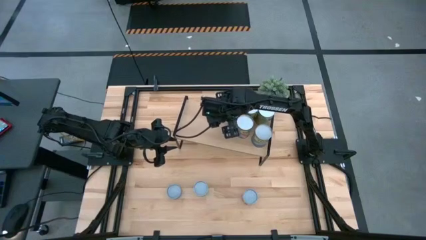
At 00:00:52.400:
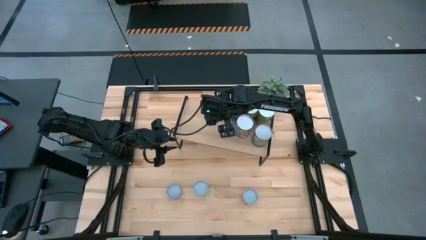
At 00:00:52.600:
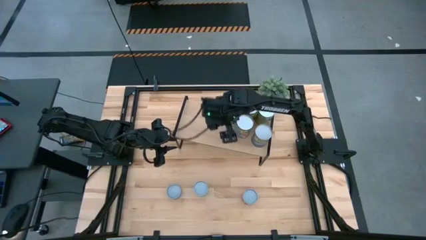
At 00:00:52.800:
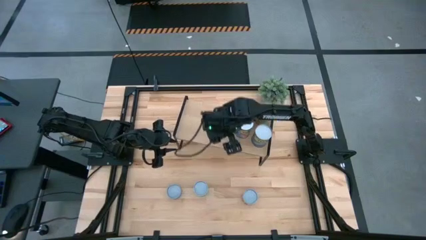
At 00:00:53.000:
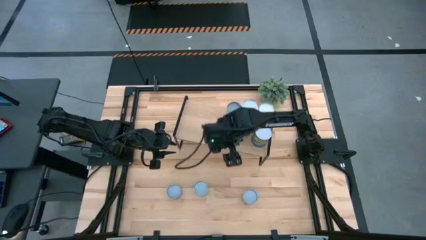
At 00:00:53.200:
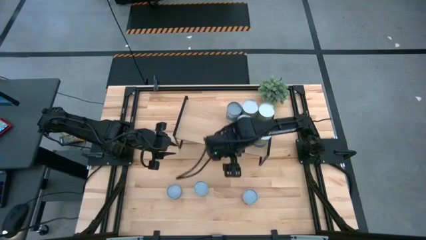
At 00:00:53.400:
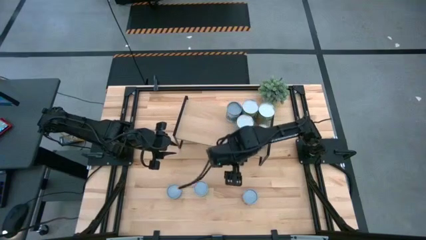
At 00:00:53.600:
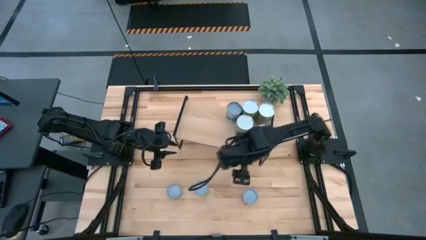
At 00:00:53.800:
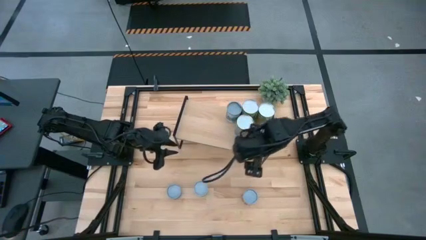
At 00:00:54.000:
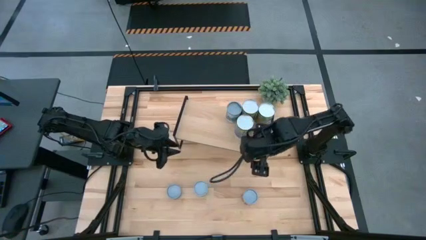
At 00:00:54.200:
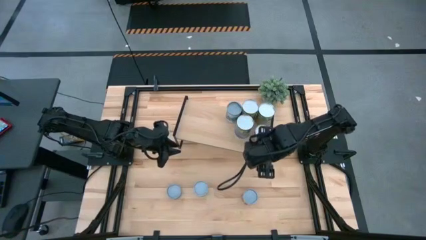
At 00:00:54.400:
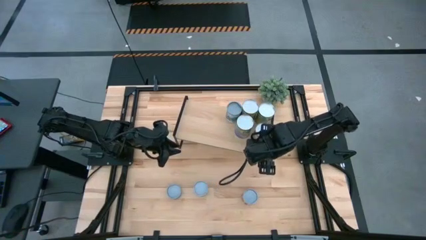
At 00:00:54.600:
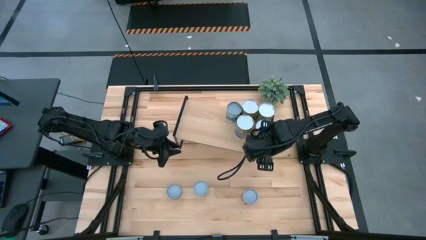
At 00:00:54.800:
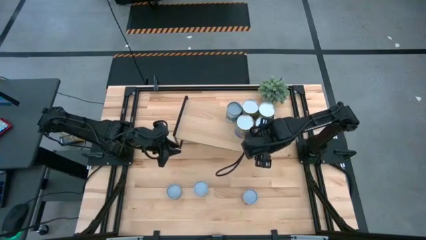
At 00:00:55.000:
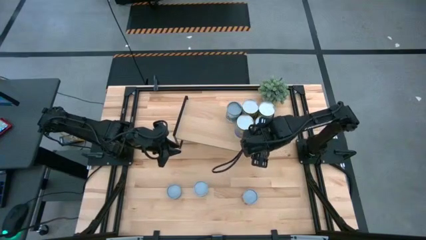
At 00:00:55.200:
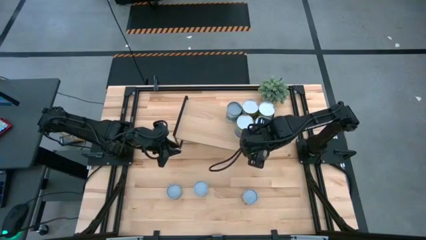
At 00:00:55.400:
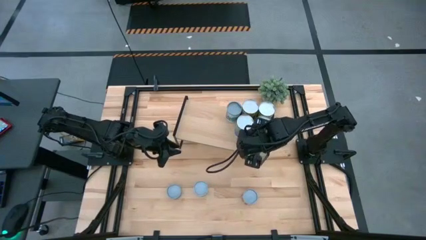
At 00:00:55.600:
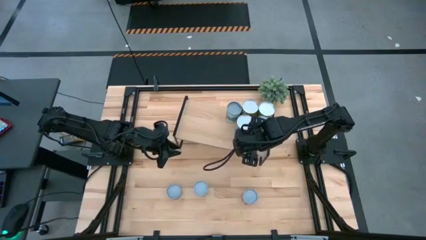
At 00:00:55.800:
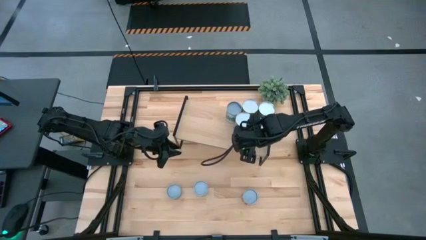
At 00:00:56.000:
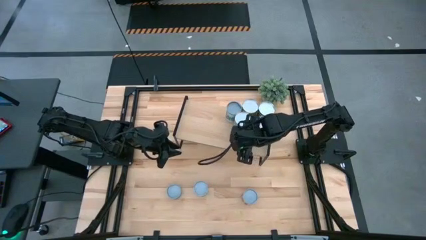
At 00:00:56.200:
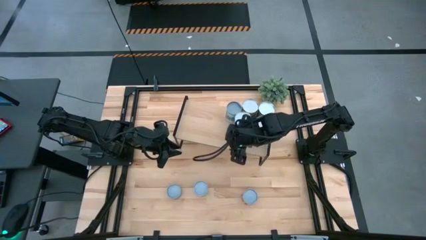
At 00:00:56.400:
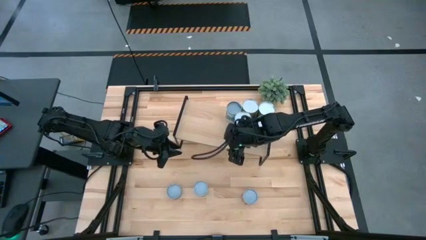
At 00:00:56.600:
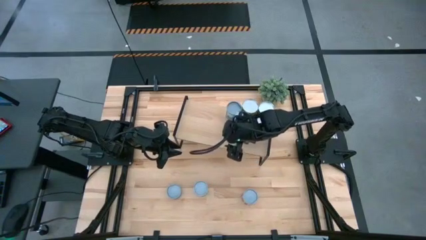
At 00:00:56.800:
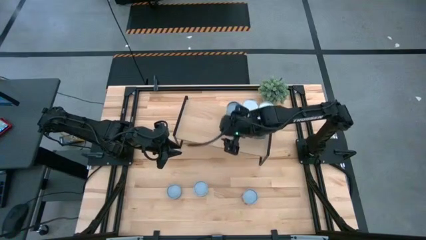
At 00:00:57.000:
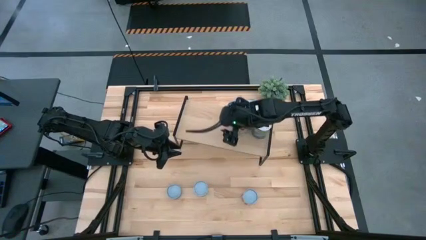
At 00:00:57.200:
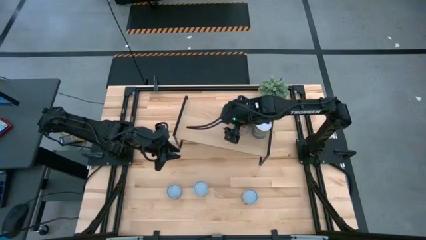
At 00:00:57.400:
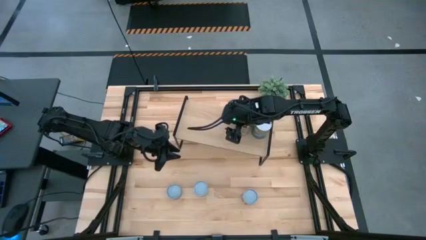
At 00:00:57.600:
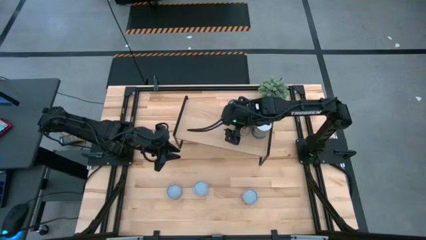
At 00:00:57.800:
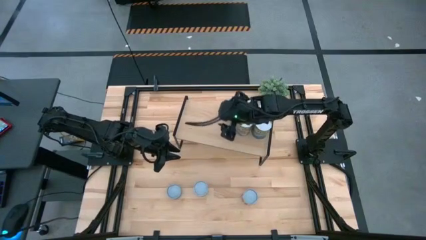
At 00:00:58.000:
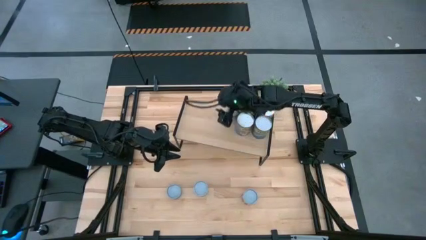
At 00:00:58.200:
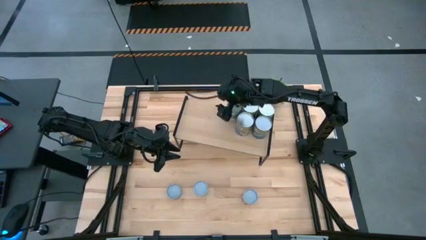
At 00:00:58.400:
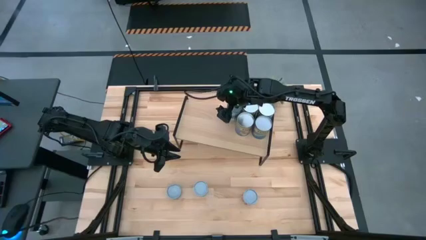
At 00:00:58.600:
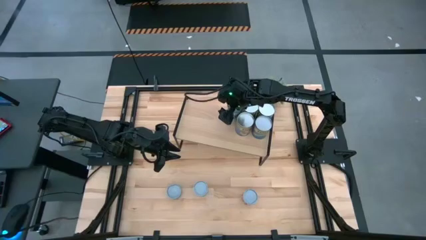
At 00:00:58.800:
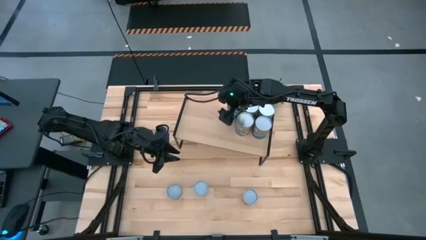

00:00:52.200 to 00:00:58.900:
Task: Pick and place cans onto a shelf
Adjust the canned goods on the shelf

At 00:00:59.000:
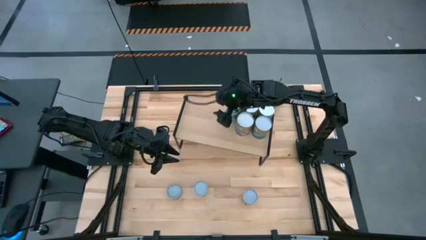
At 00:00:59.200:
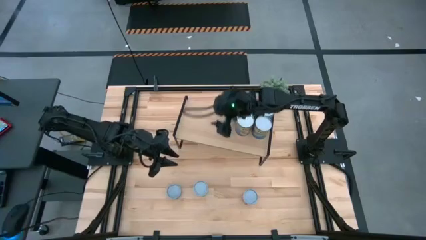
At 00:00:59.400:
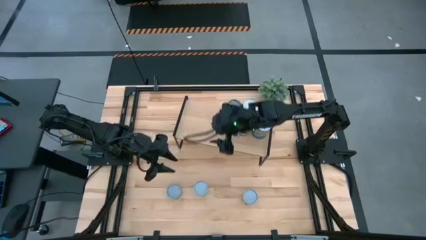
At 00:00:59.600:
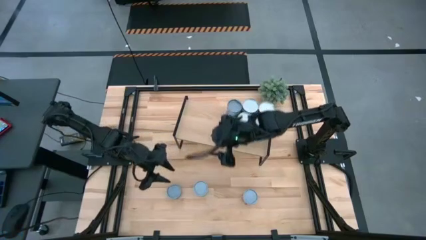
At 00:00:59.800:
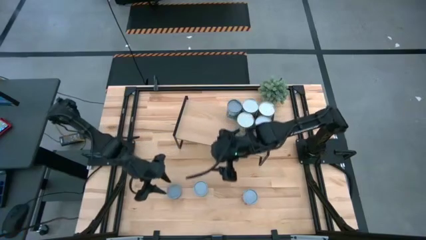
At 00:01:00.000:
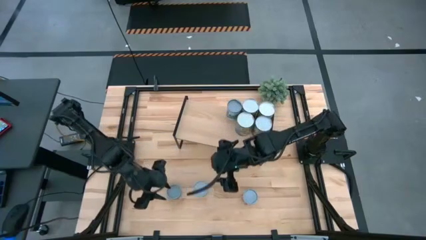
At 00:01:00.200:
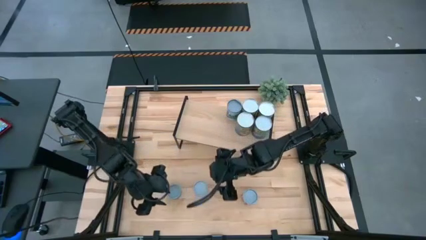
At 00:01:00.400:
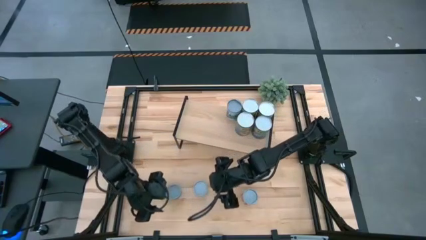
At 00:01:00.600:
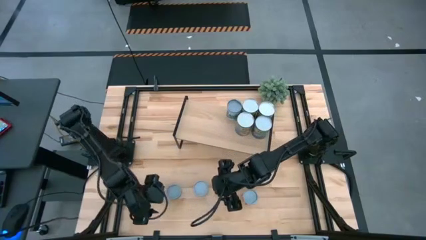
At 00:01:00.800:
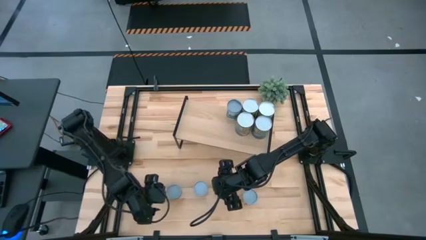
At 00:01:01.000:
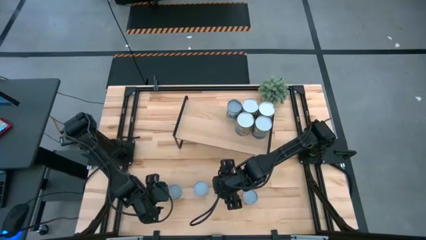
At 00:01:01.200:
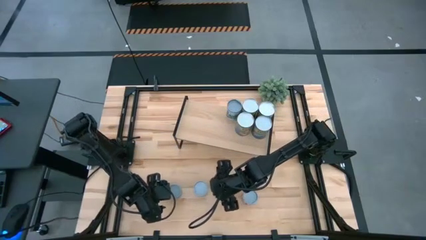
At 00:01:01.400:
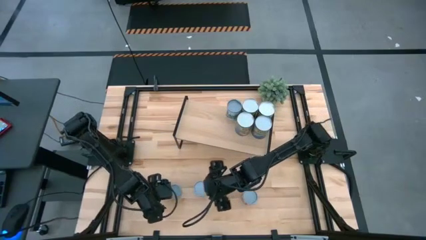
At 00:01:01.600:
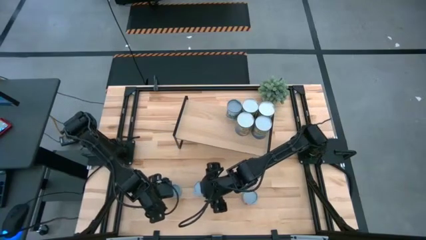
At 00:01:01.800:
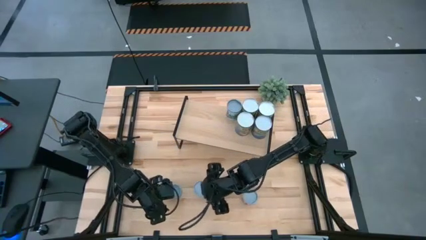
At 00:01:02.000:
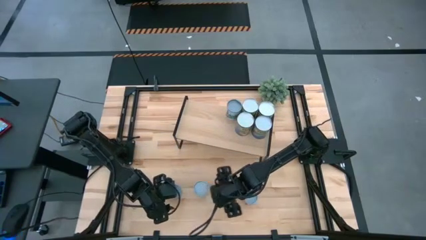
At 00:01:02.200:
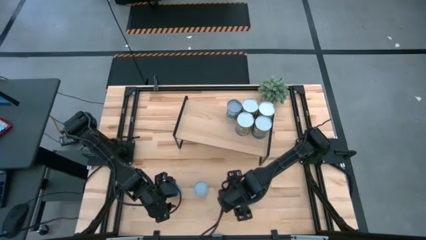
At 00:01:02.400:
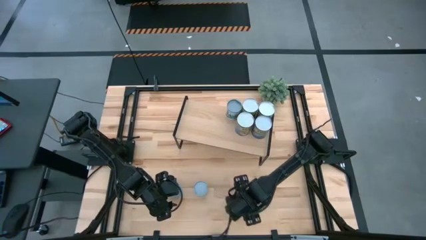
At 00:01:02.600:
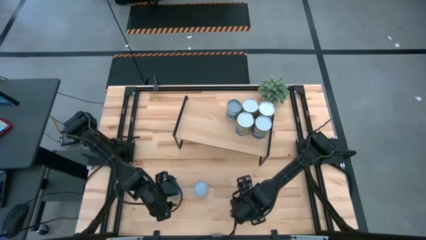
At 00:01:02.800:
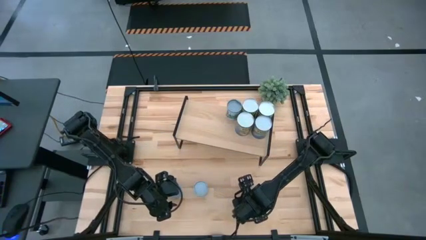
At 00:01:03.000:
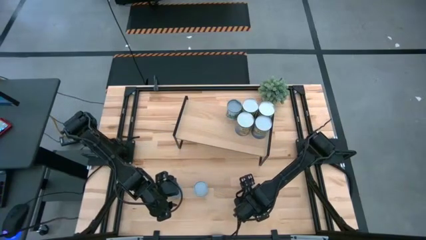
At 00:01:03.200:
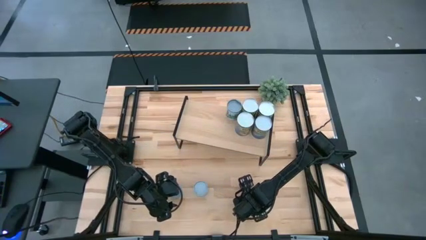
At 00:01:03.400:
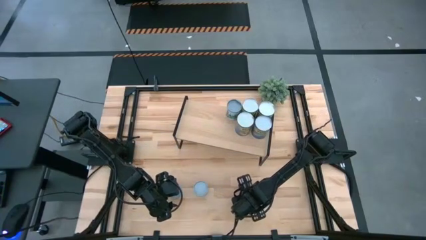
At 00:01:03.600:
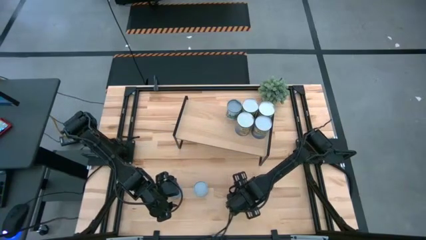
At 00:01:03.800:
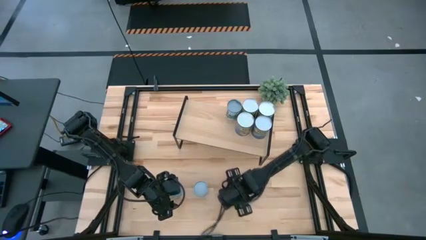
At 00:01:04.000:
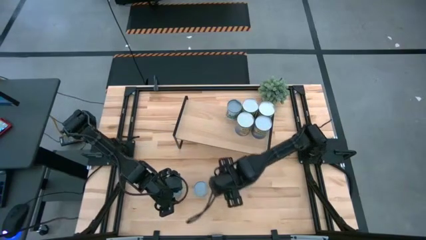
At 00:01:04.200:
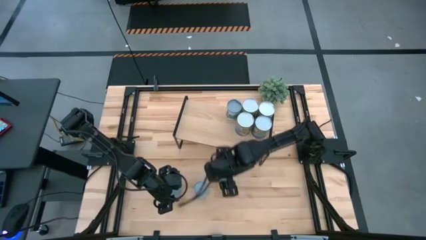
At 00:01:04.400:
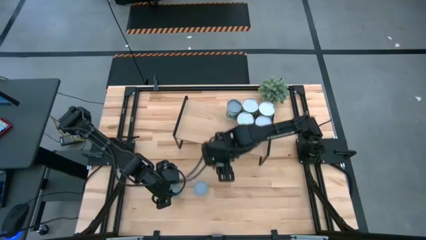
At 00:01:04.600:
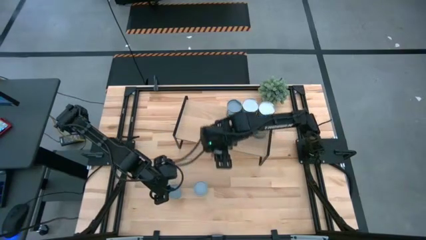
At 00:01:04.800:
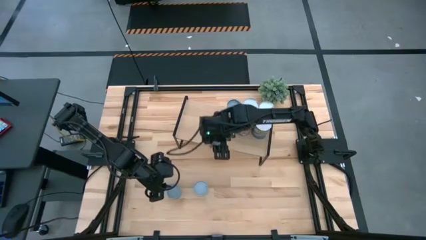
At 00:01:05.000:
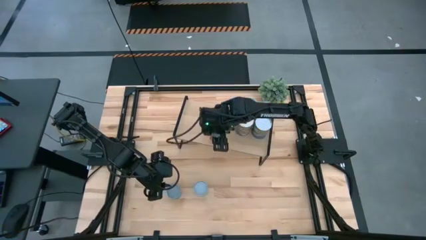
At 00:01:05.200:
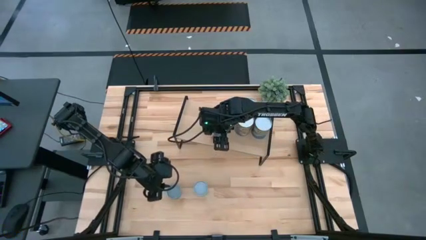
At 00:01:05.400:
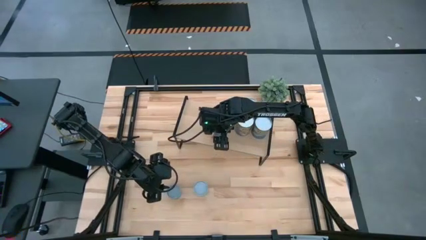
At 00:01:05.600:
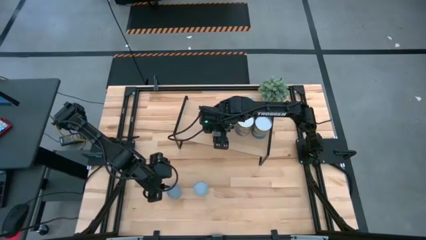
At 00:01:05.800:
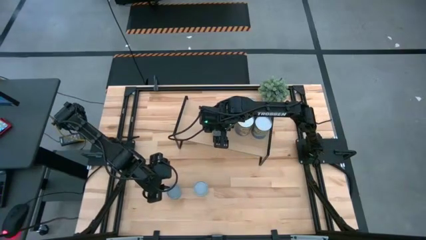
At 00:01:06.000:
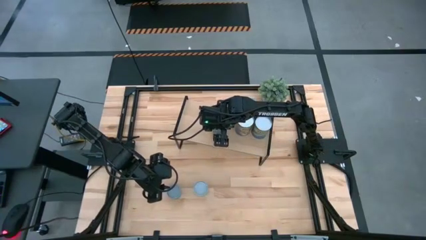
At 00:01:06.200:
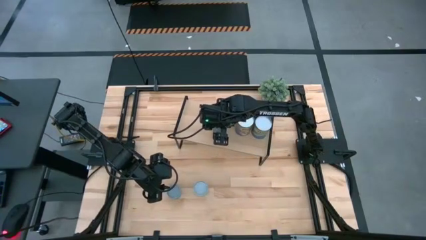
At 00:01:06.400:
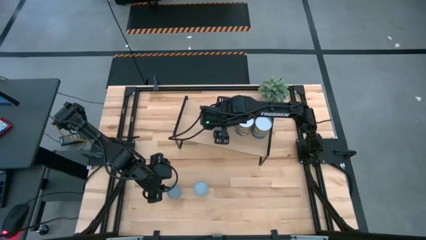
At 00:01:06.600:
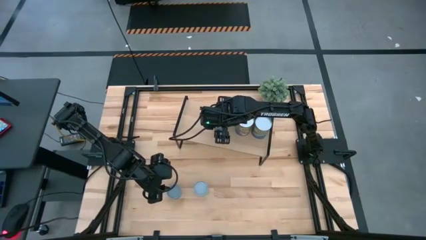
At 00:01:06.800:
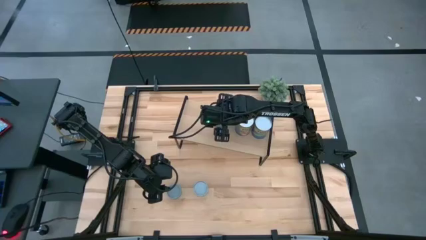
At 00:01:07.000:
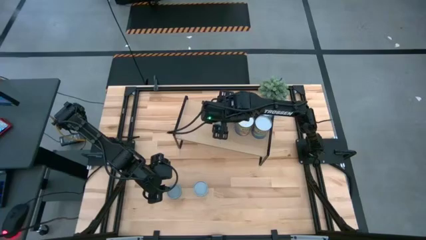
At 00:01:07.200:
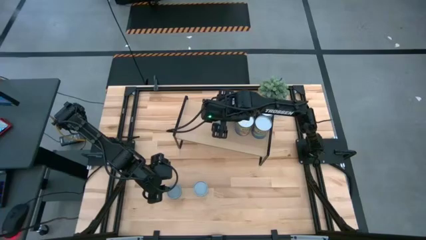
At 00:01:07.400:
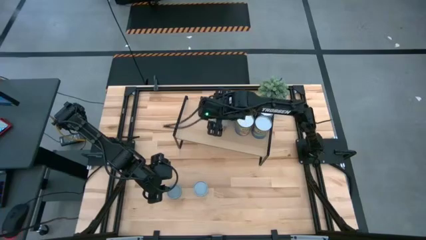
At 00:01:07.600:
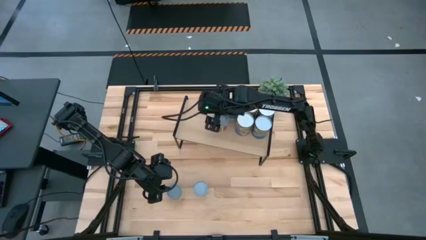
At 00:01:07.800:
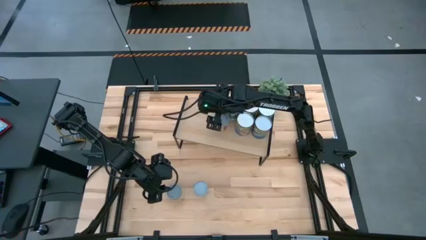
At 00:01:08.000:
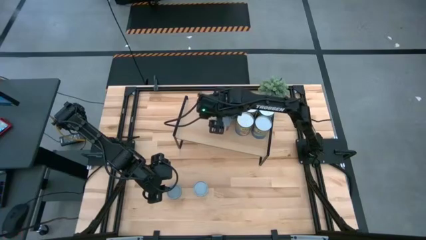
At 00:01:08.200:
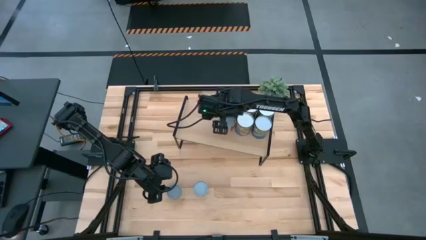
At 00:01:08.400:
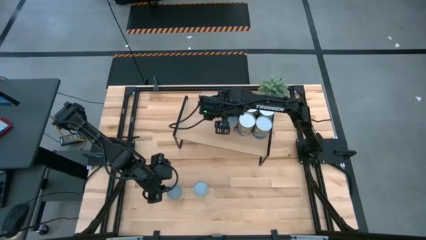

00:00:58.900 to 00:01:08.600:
Put the canned diced tomatoes on the shelf
